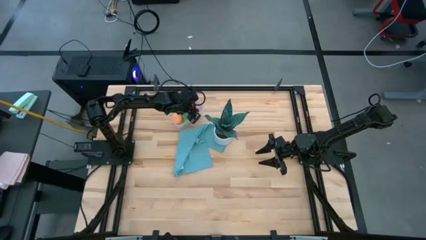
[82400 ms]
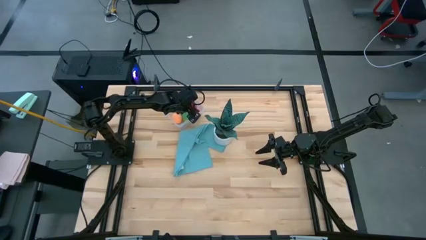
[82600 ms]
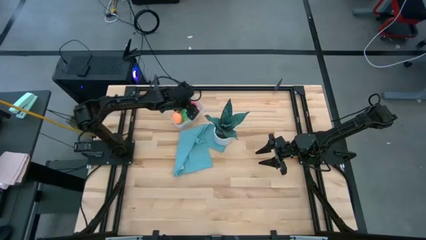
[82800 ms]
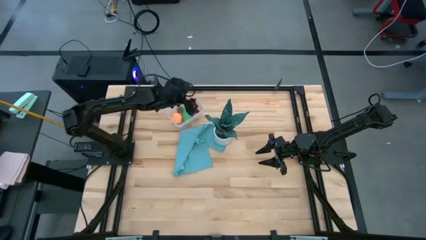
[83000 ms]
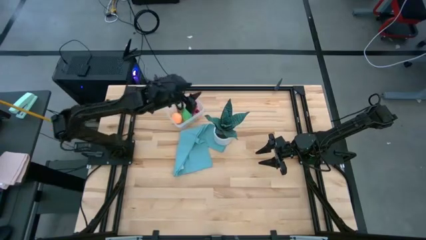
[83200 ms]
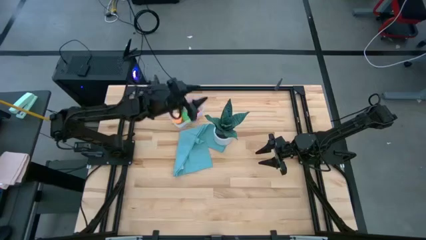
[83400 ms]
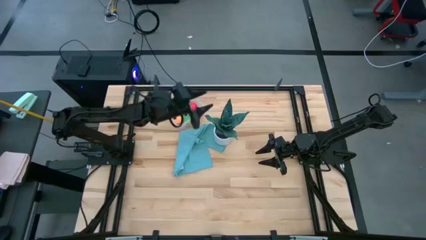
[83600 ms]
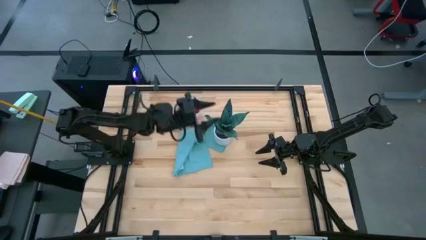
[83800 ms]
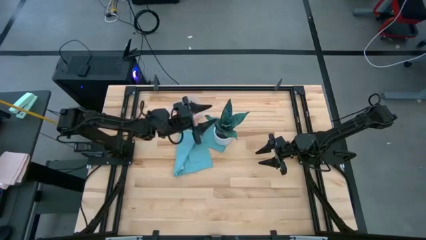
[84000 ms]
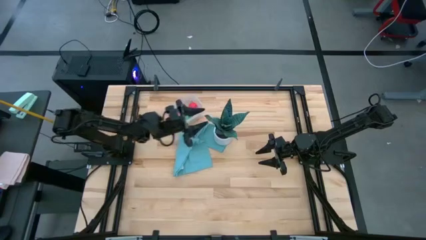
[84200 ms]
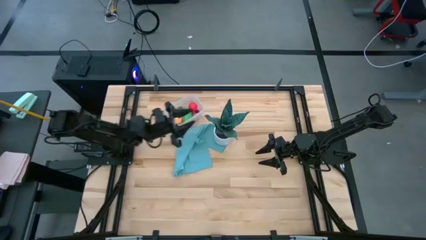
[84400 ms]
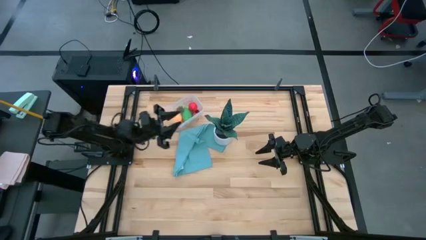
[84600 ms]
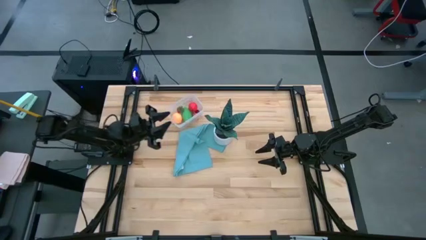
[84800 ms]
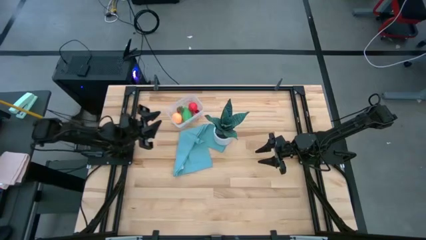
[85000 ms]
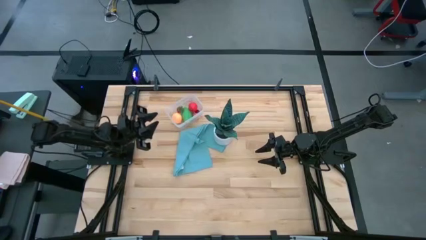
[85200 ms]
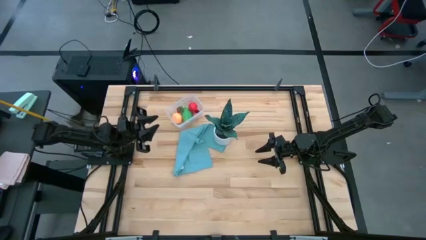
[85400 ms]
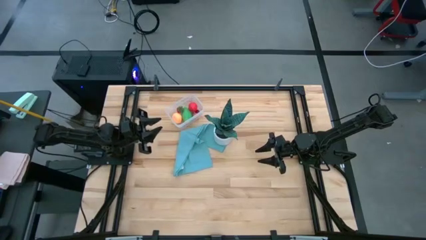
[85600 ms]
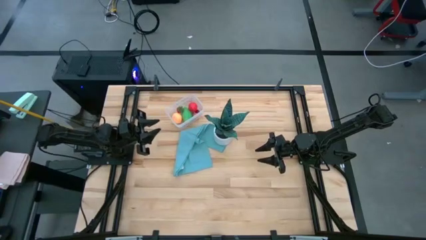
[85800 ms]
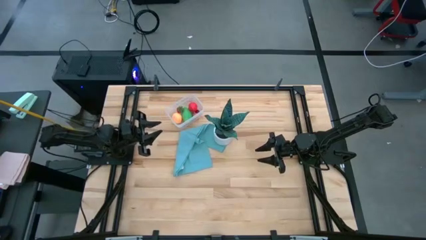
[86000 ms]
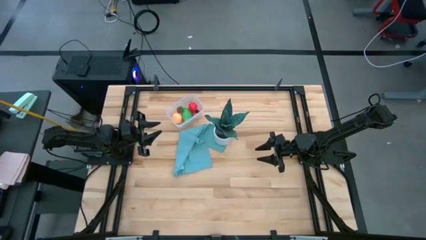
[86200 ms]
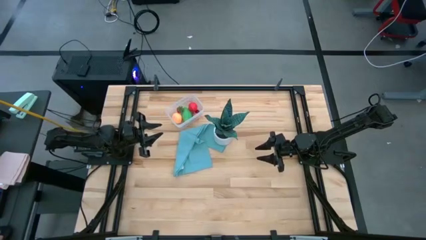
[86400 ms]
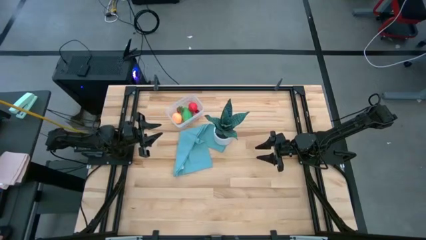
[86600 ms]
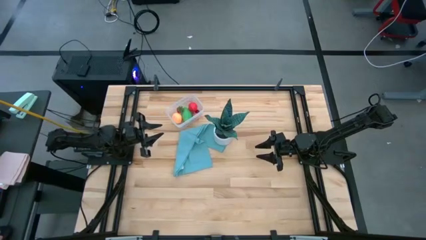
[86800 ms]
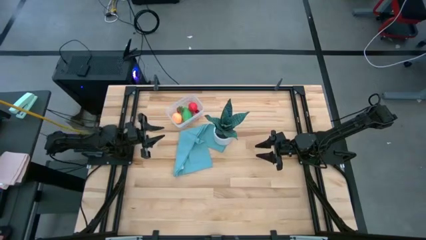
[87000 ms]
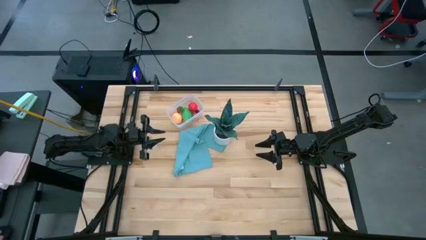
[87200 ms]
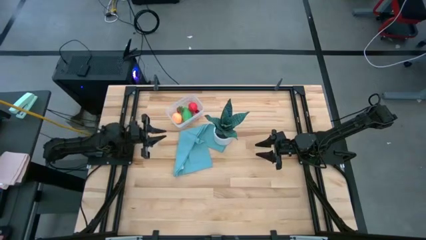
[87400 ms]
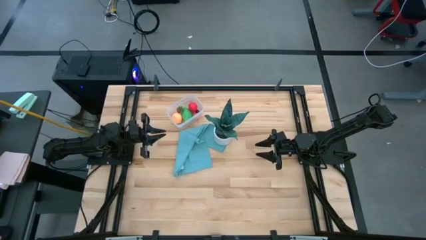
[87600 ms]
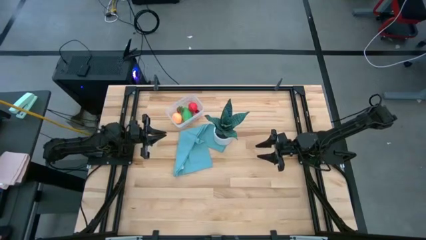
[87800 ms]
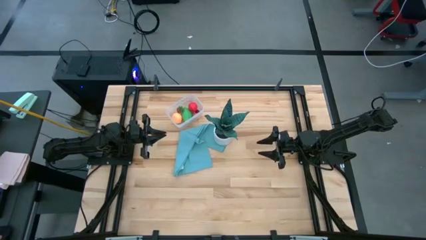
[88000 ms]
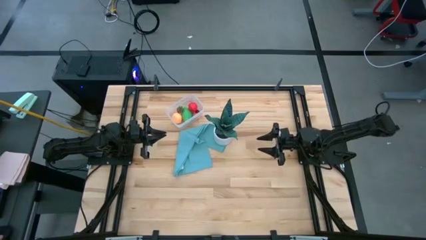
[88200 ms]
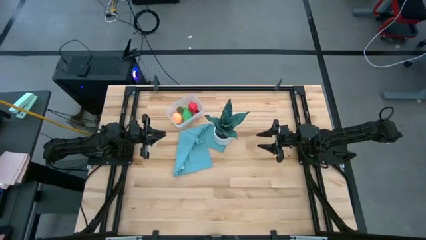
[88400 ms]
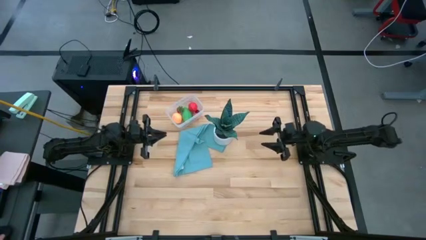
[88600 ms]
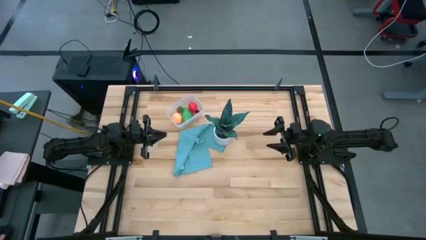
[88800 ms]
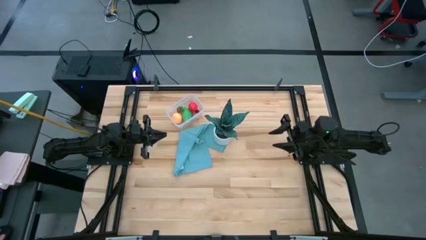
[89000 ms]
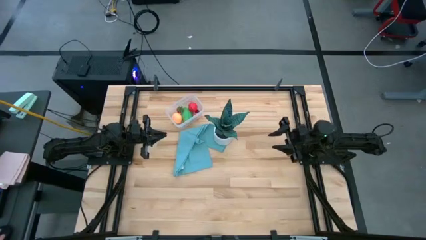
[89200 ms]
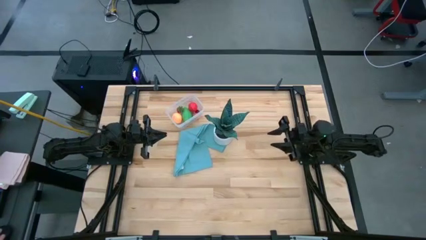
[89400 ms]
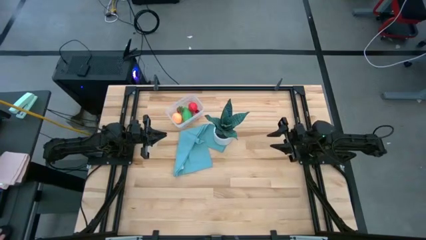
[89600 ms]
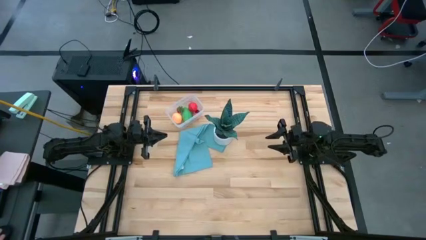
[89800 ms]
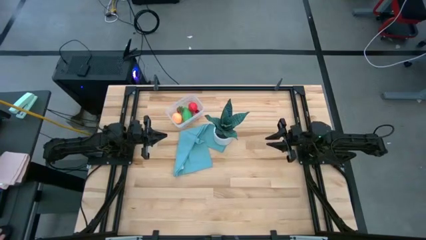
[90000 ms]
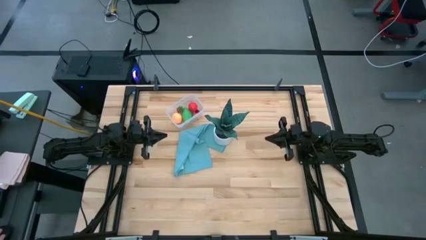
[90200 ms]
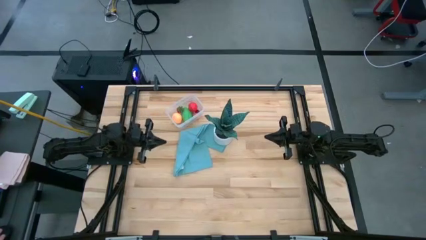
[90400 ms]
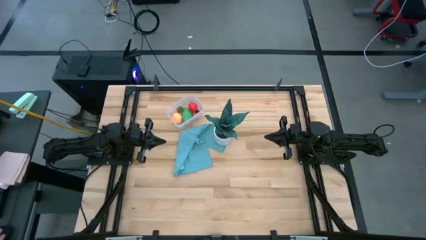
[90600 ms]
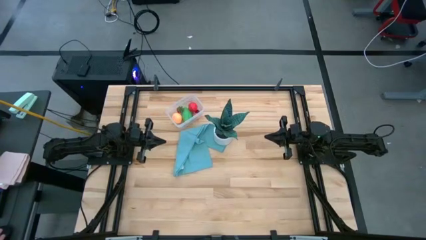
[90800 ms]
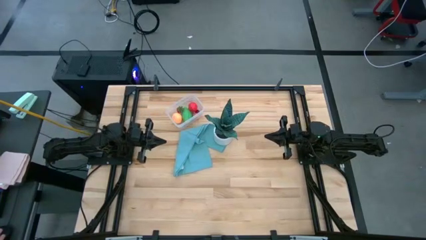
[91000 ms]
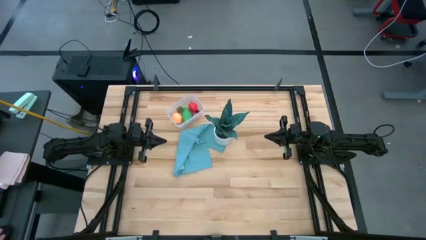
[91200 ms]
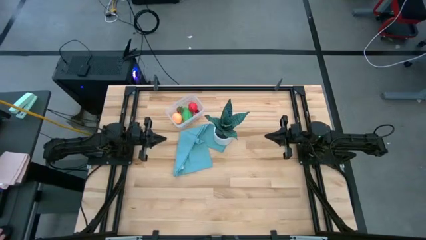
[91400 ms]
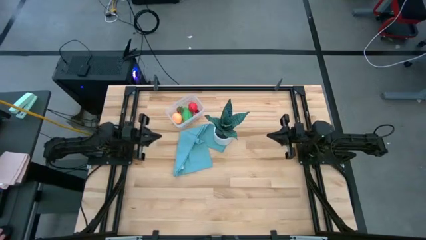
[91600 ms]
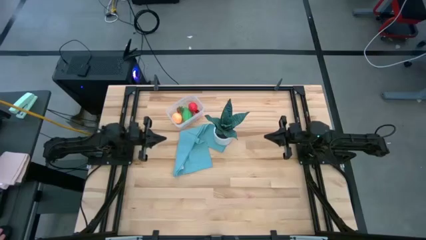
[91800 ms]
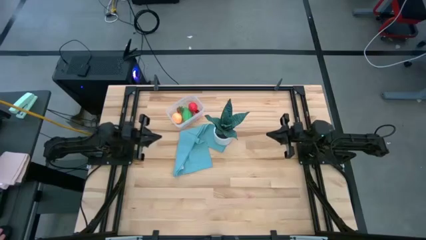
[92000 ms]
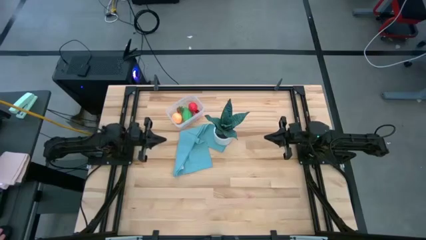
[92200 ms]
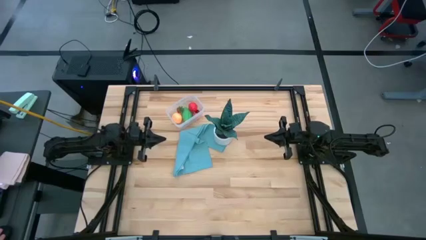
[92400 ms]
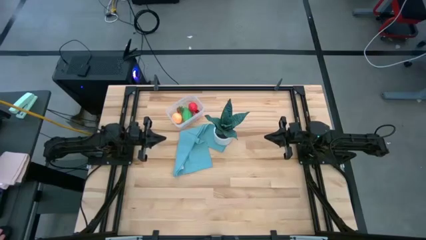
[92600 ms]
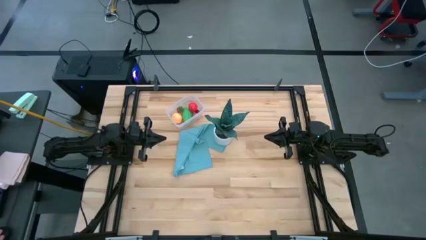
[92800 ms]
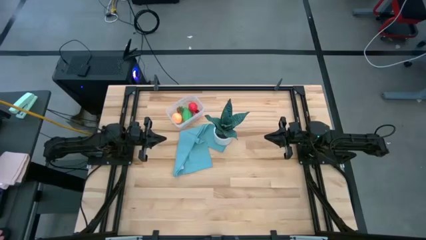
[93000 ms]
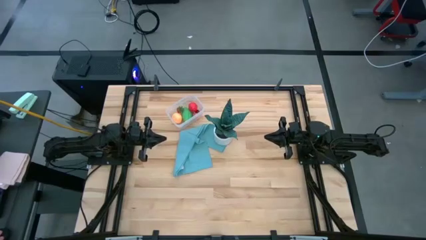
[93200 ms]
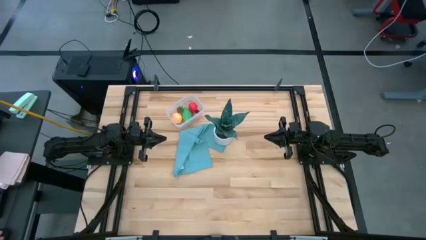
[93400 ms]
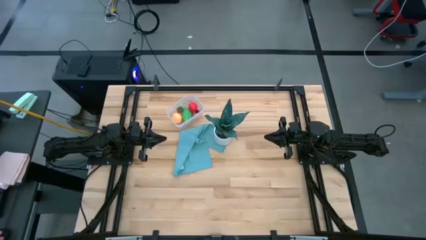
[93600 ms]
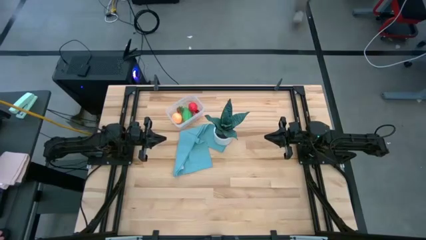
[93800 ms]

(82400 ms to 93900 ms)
Task: Pick and placing Produce into tupperware
Return to Home Position
